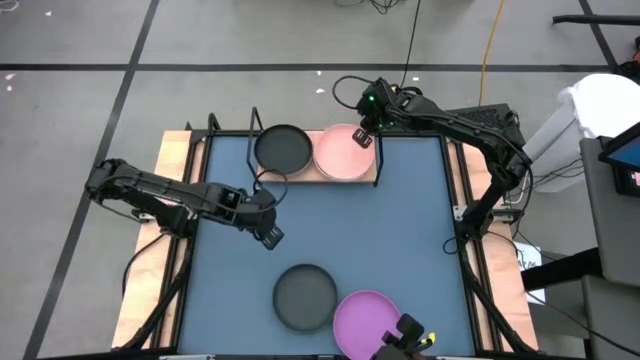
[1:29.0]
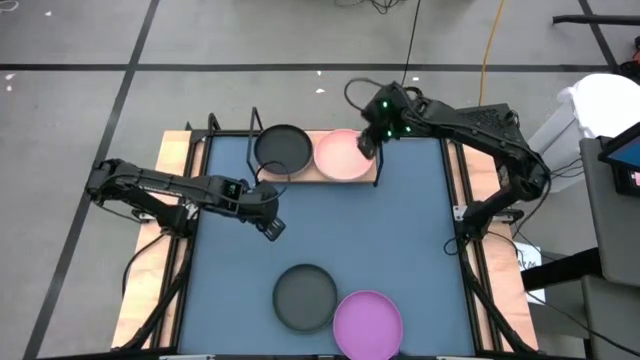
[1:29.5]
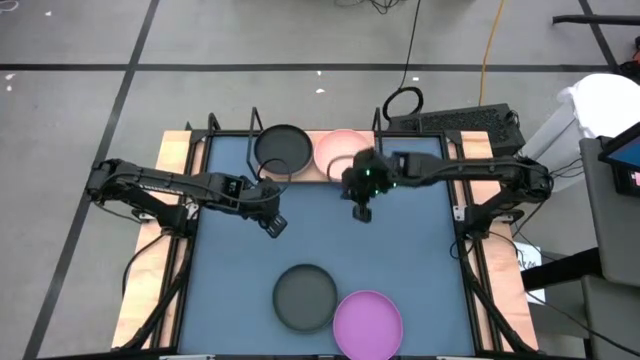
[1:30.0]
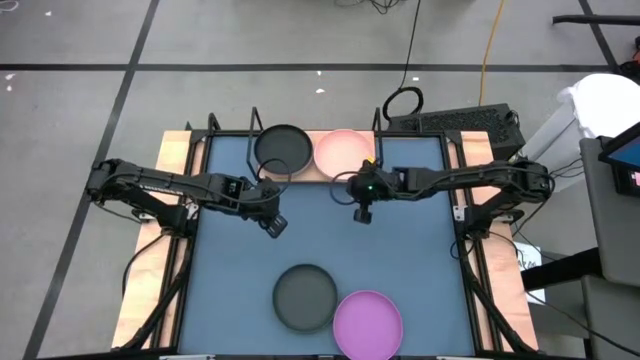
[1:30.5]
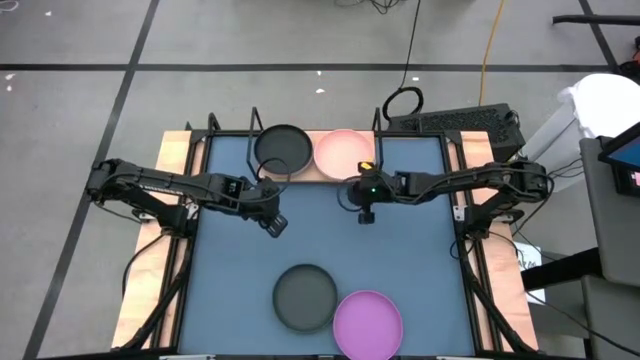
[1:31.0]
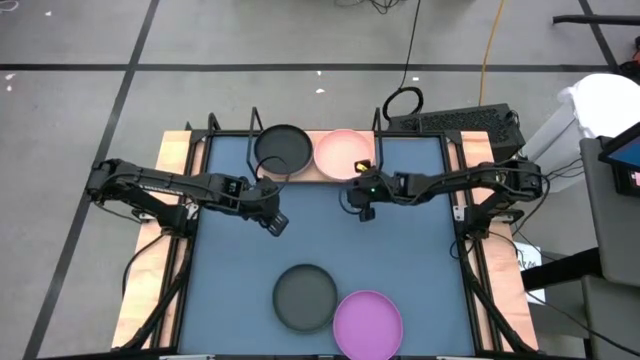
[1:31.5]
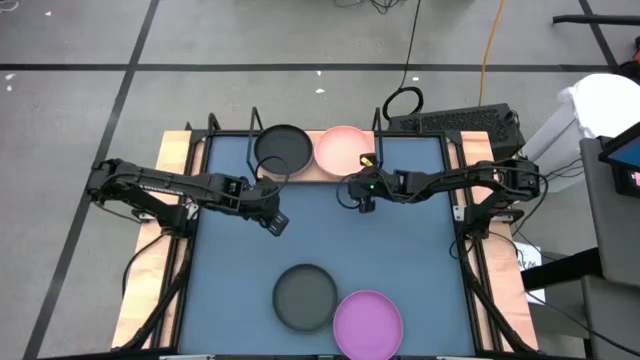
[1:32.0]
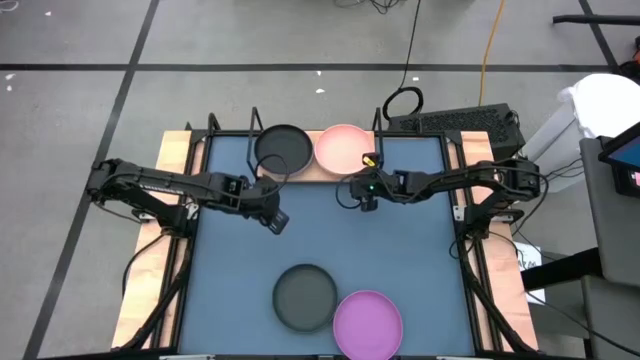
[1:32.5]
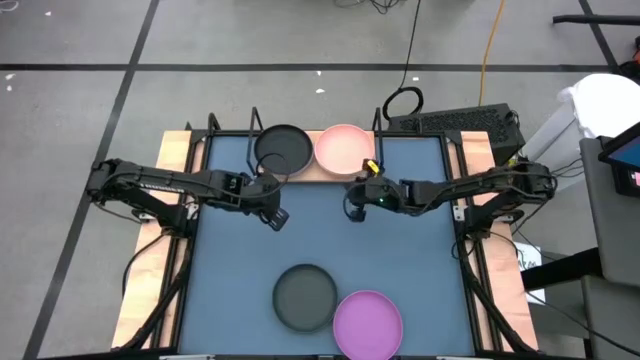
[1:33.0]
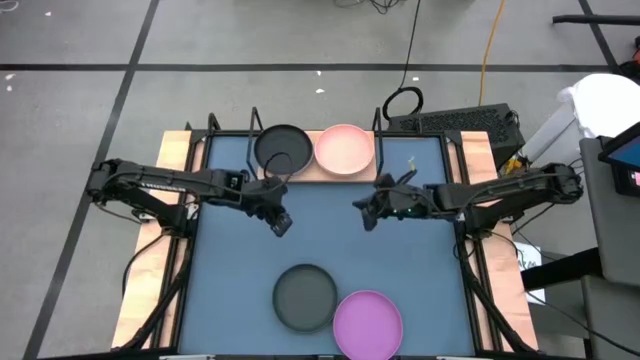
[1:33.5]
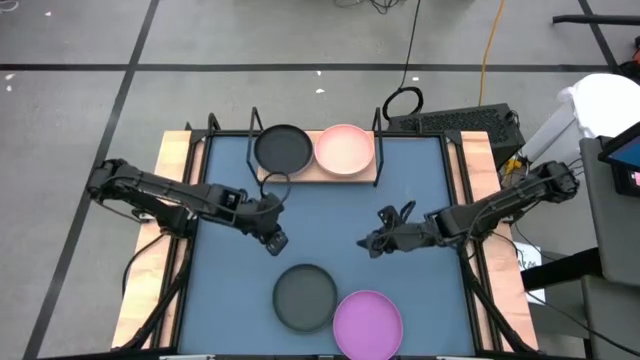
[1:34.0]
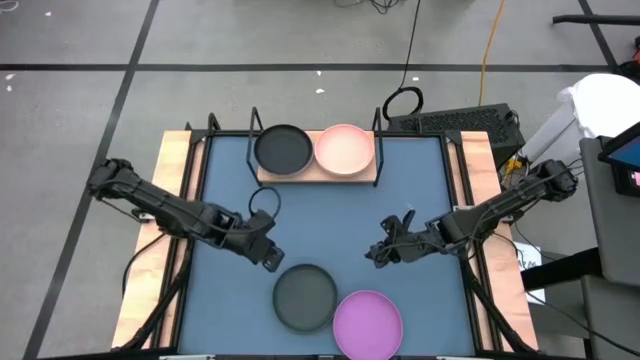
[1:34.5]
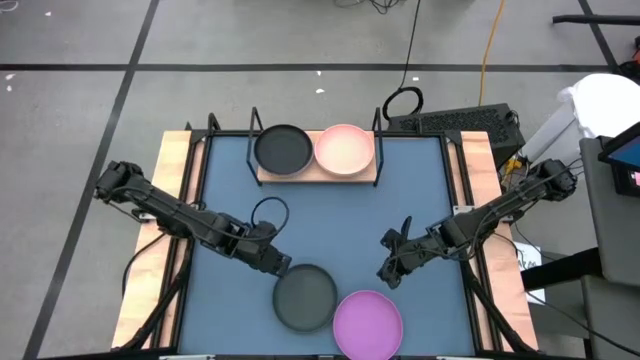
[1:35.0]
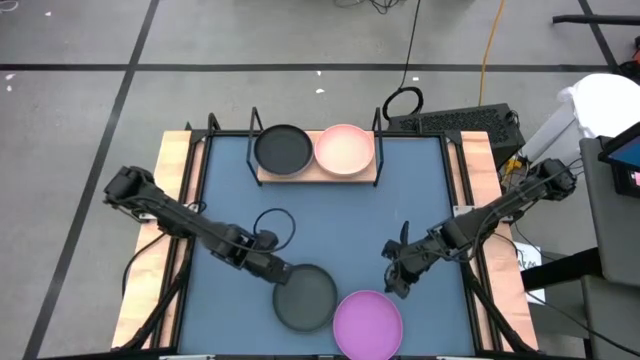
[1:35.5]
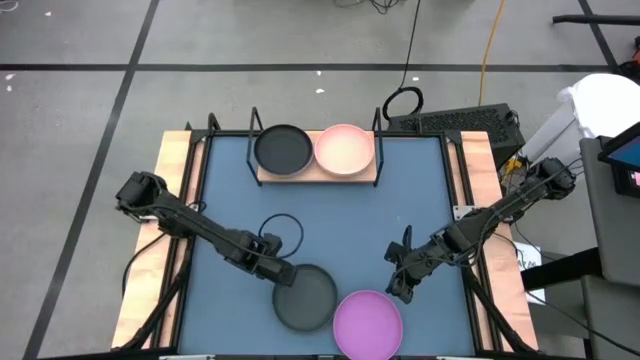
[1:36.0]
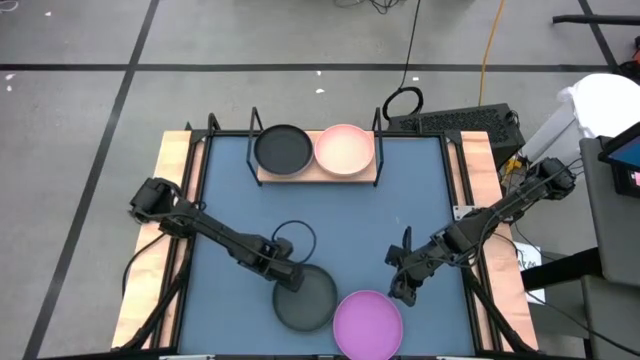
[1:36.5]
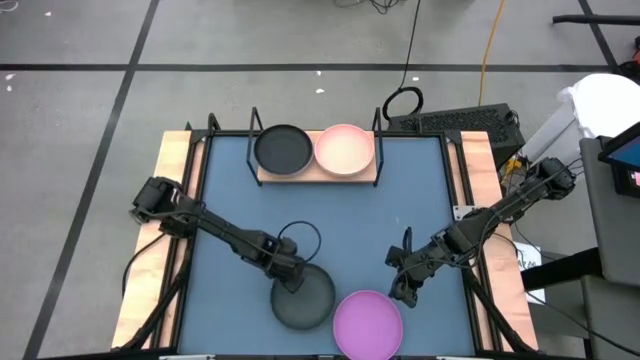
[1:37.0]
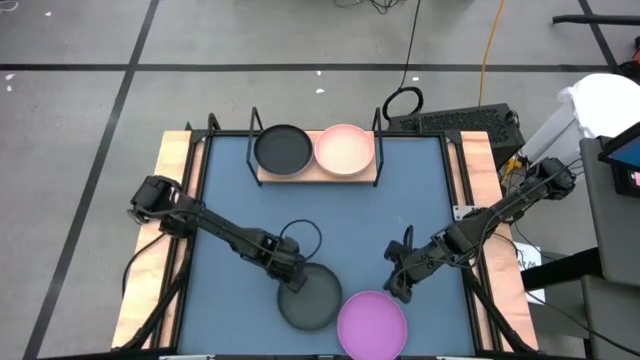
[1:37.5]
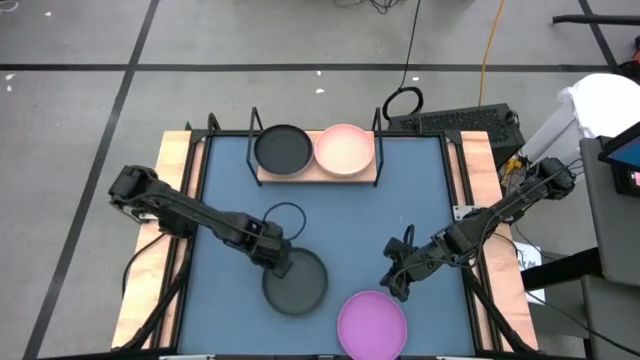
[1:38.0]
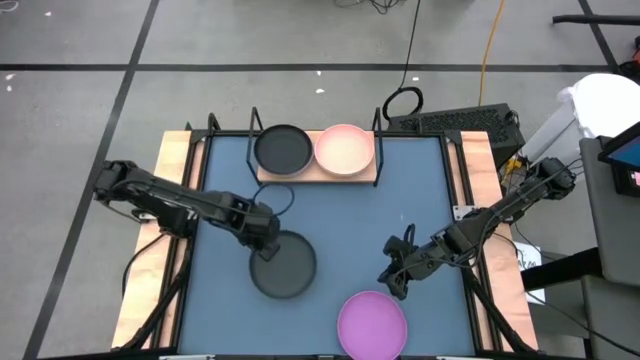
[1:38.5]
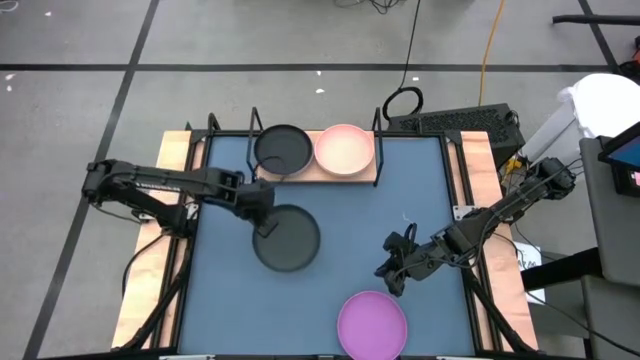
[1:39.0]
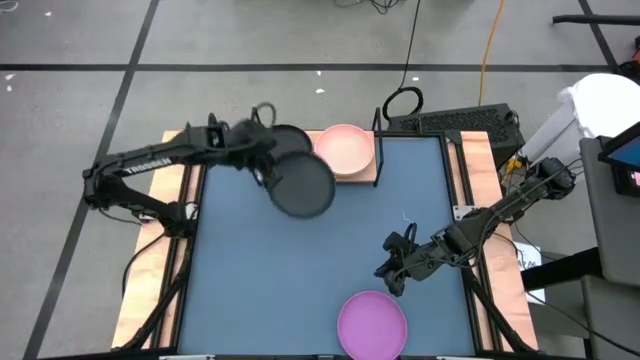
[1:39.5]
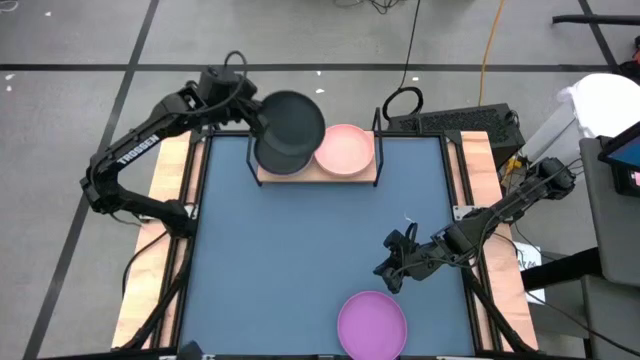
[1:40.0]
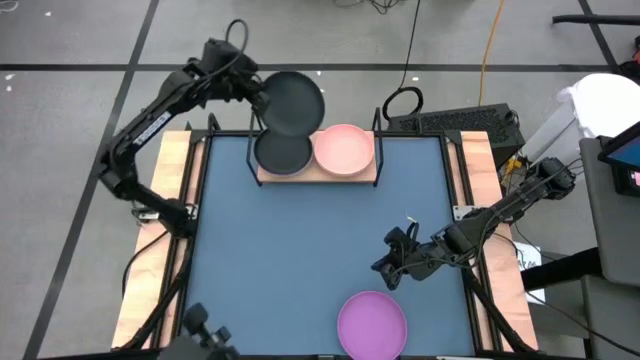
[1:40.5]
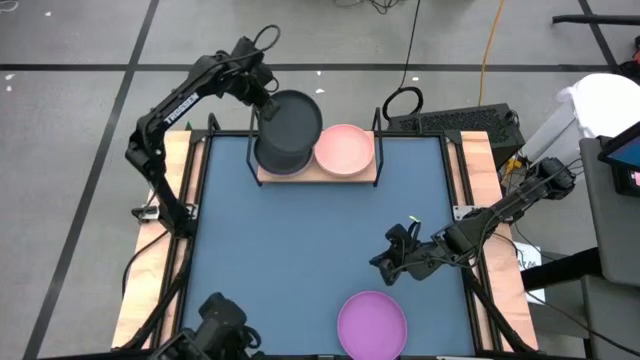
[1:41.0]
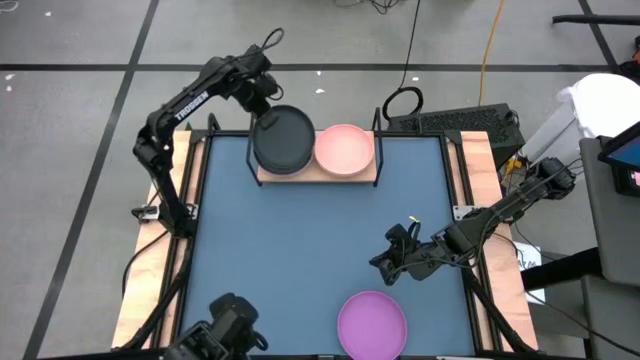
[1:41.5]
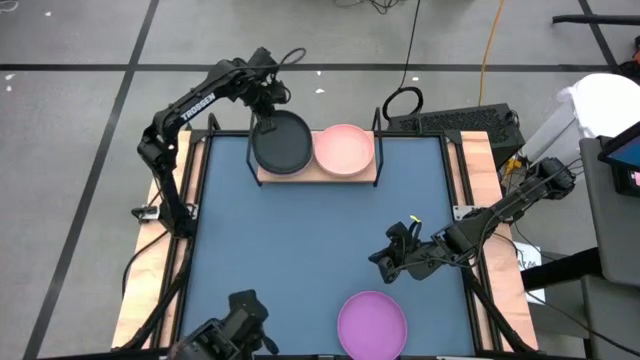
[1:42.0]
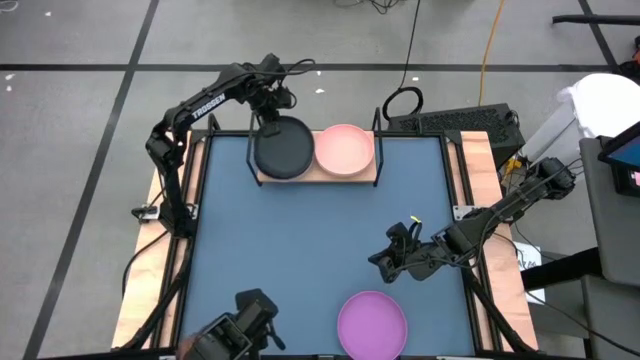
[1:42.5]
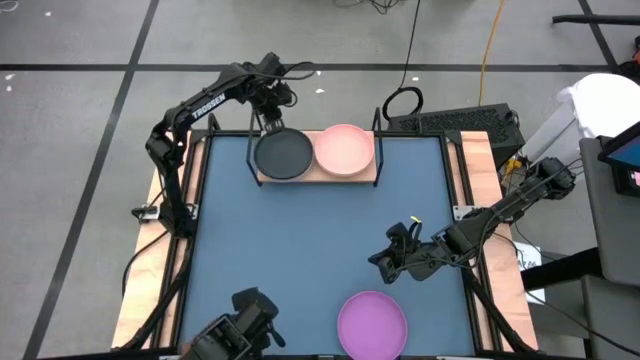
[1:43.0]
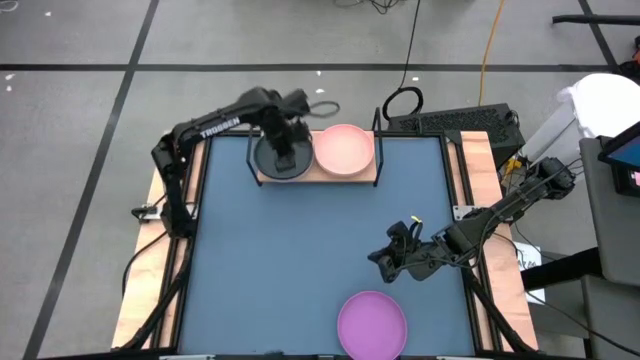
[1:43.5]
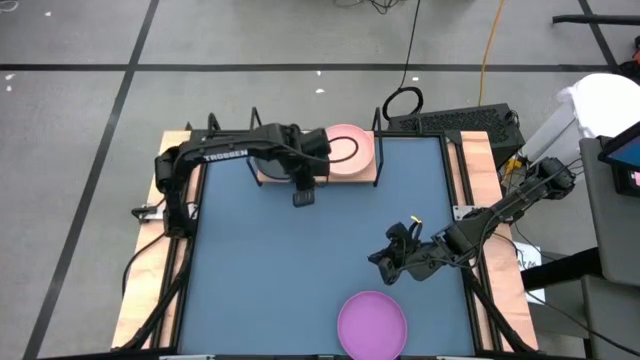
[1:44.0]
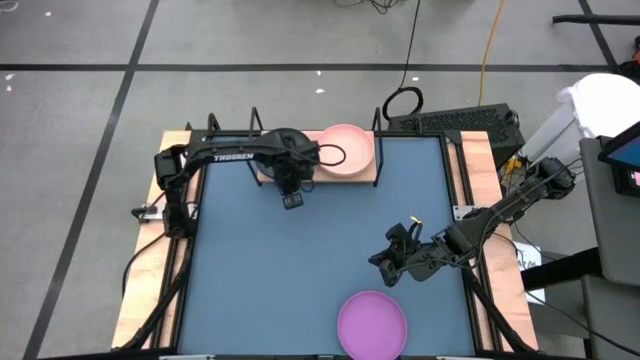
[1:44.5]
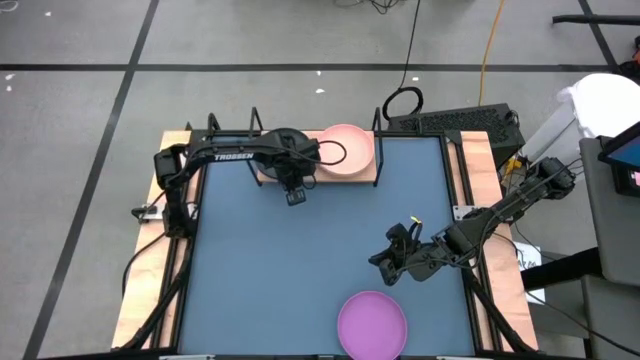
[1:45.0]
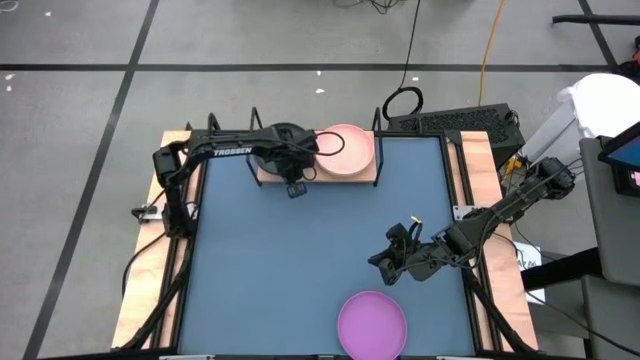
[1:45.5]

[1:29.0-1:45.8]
Task: Place and stack plates onto a shelf
Stack the black plate on top of the black plate

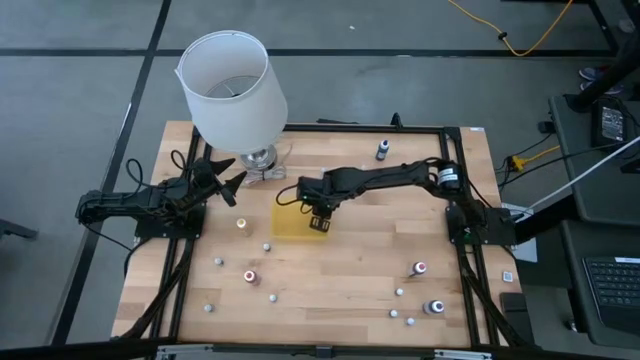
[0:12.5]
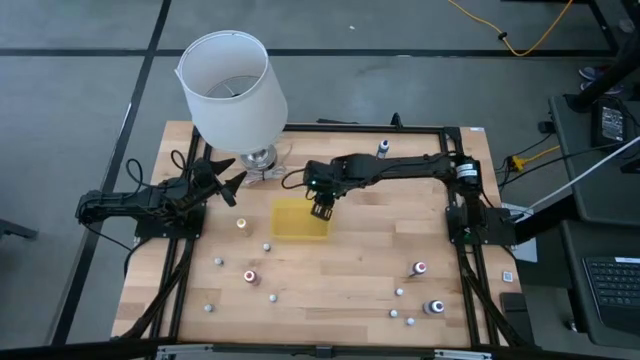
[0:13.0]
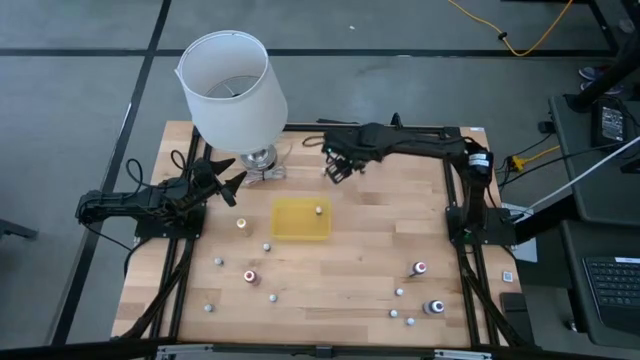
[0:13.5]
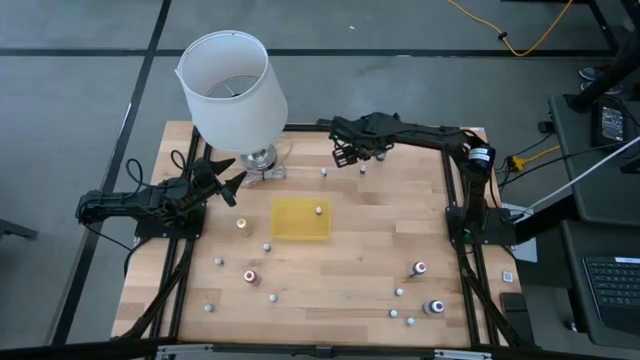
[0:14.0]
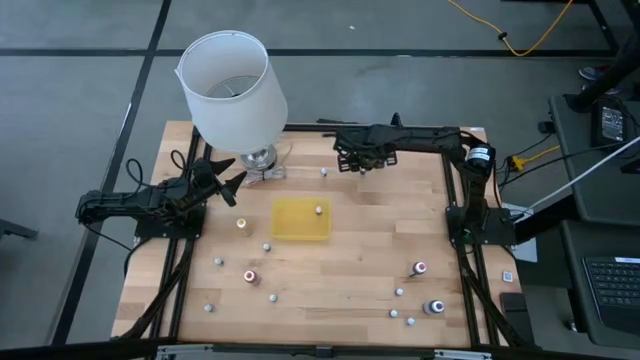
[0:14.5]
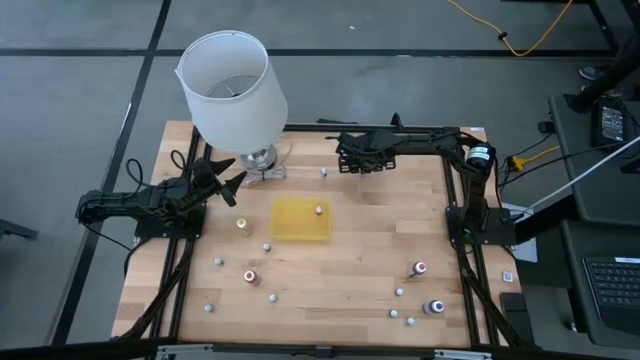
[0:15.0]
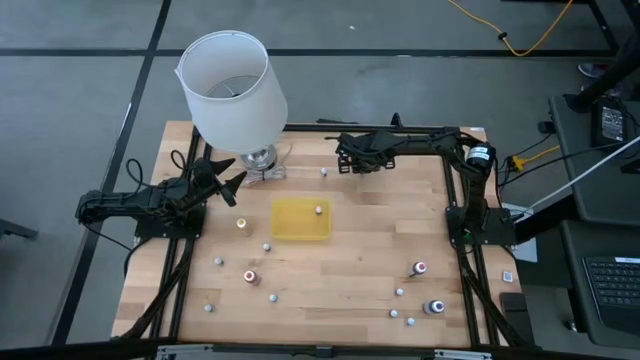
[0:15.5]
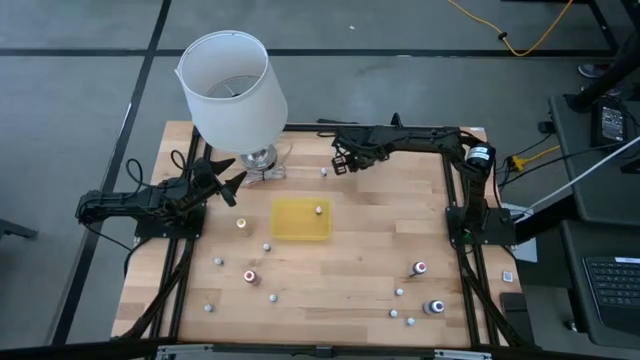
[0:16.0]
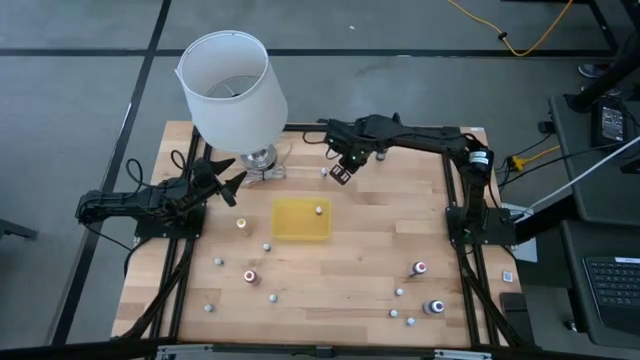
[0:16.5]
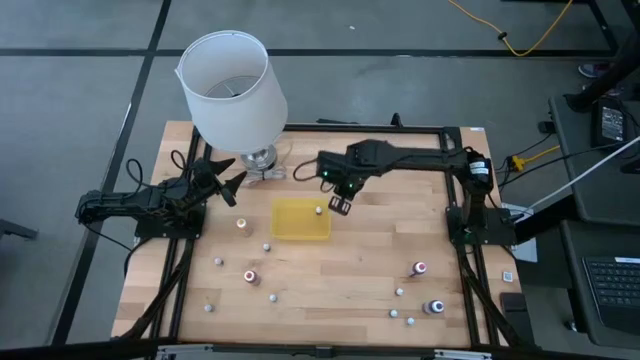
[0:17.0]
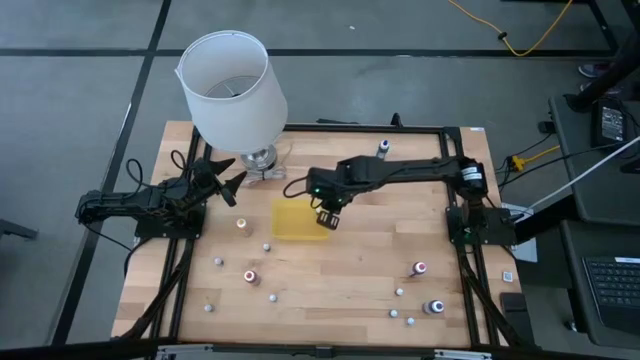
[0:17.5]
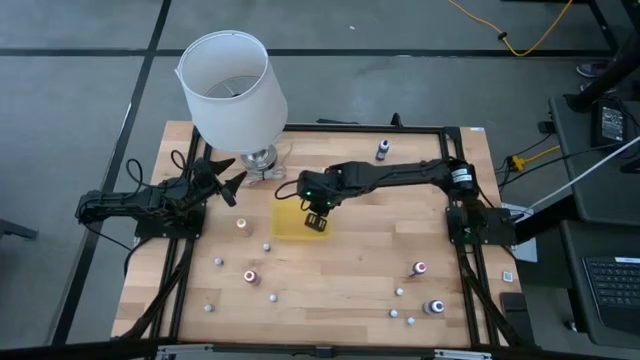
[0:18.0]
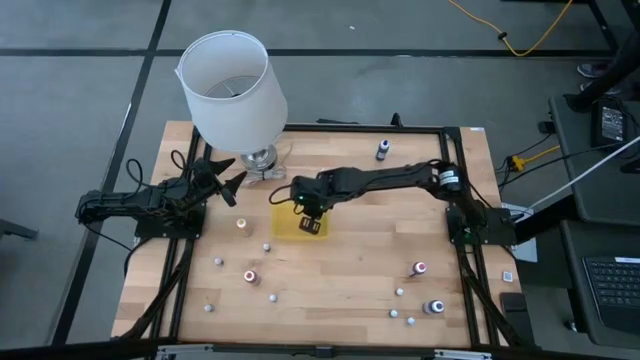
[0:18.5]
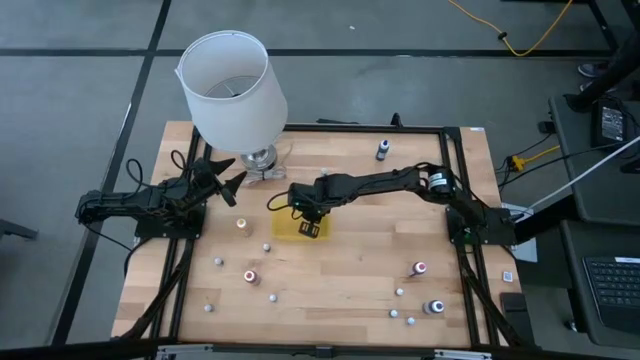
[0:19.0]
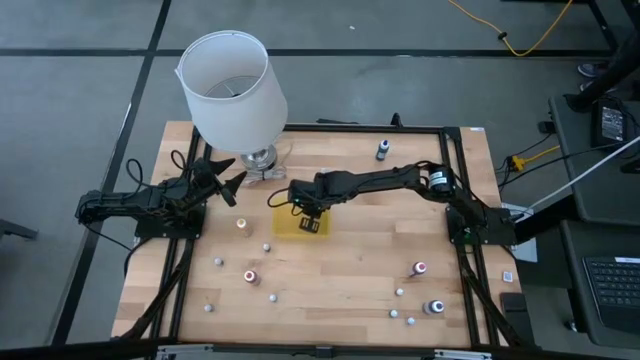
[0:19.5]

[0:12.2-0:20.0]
Task: Pick & Place food coloring
Put the red food coloring bottle into the yellow bin
